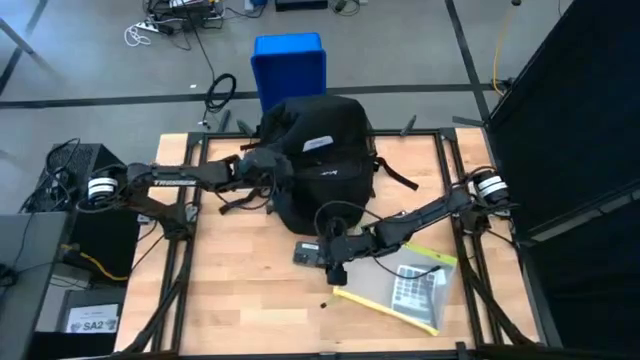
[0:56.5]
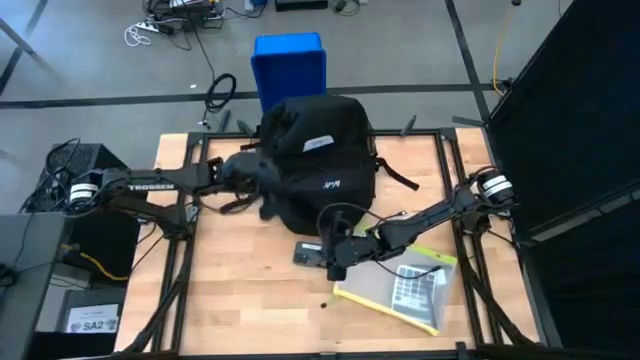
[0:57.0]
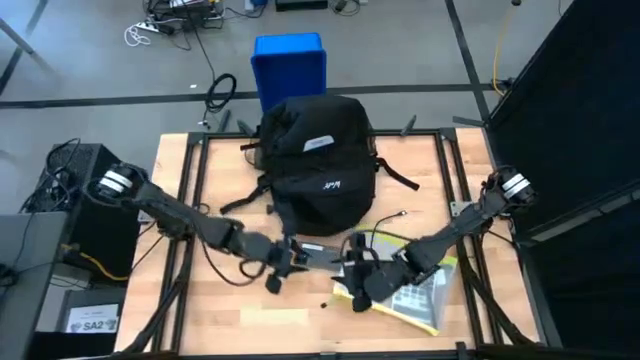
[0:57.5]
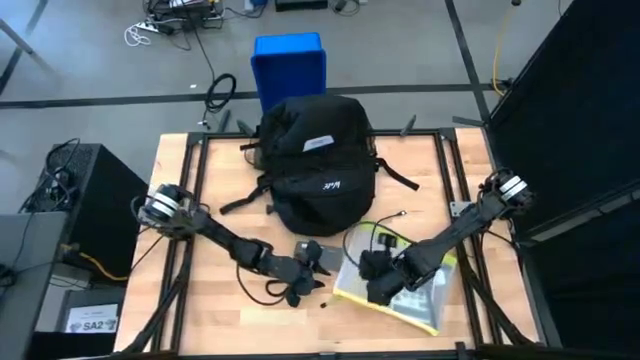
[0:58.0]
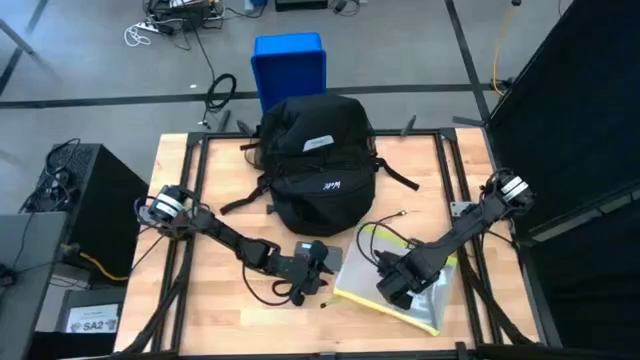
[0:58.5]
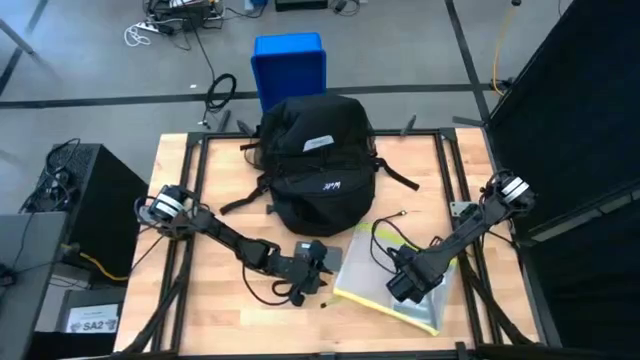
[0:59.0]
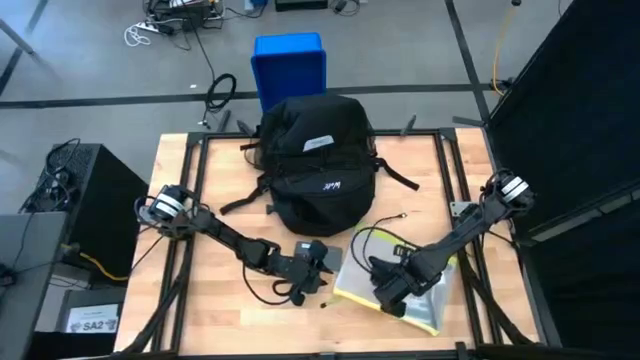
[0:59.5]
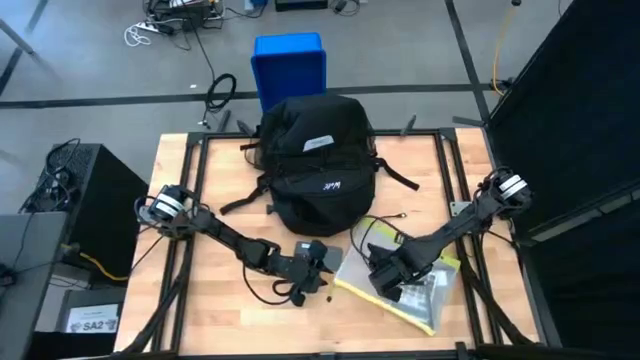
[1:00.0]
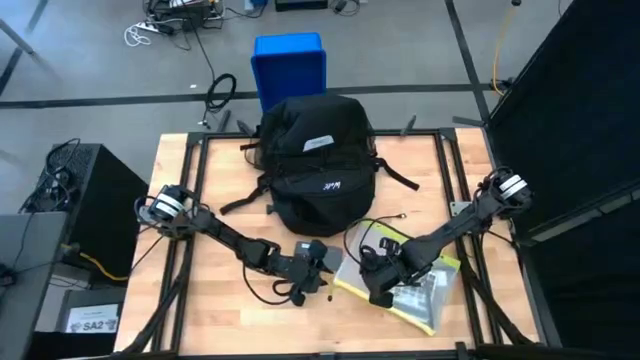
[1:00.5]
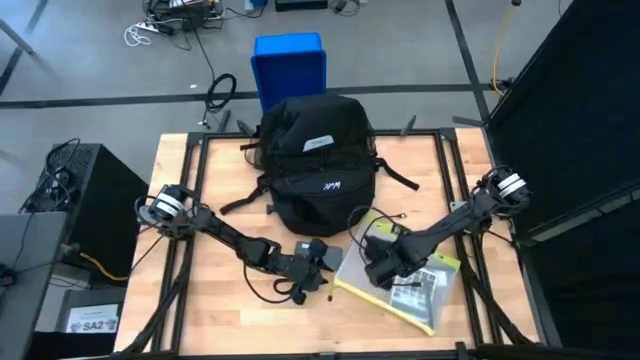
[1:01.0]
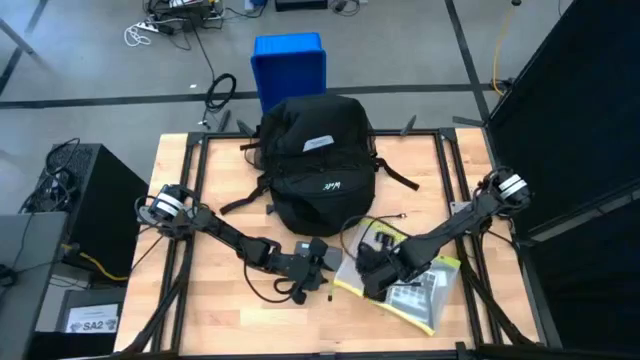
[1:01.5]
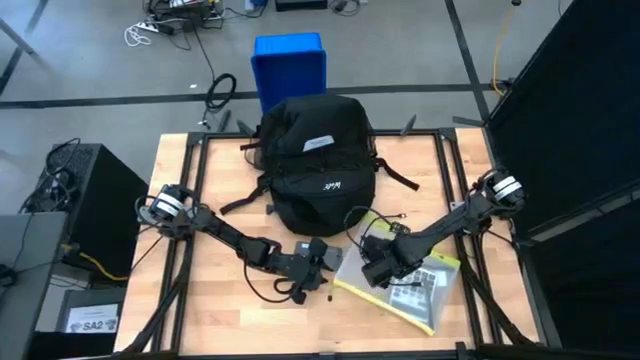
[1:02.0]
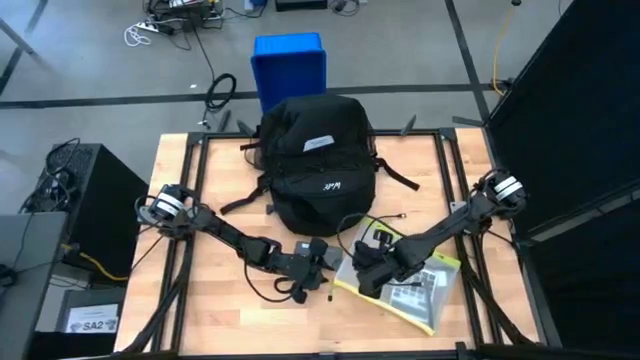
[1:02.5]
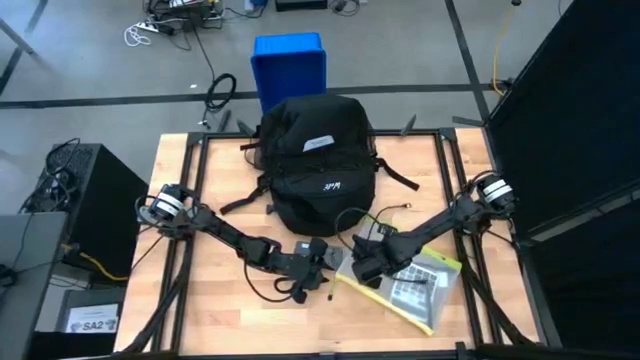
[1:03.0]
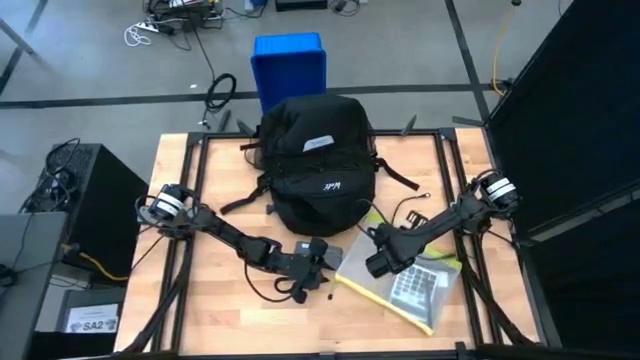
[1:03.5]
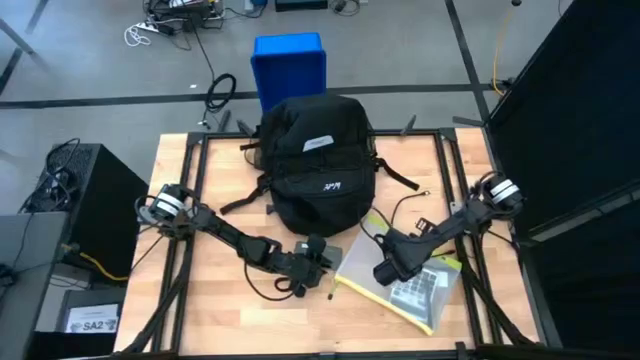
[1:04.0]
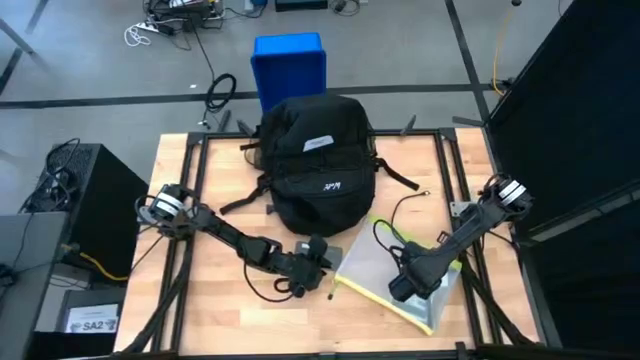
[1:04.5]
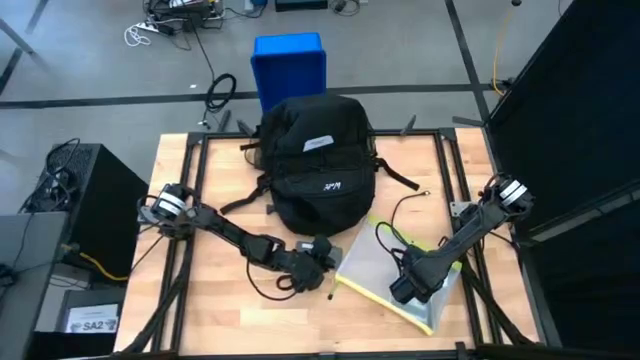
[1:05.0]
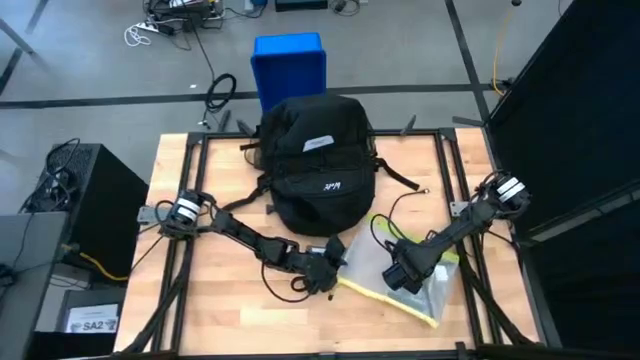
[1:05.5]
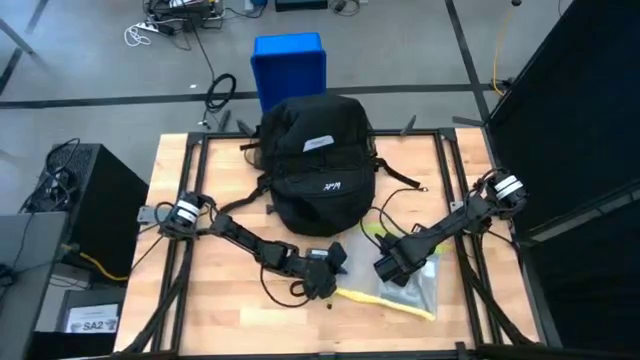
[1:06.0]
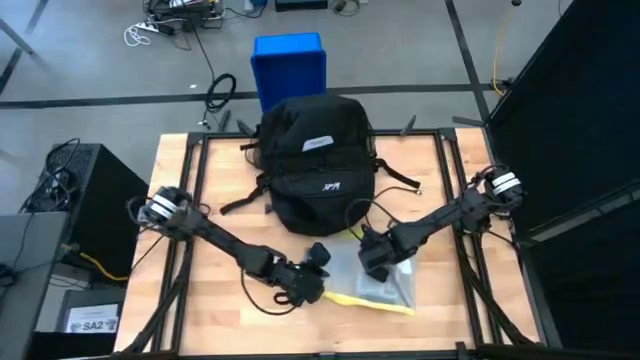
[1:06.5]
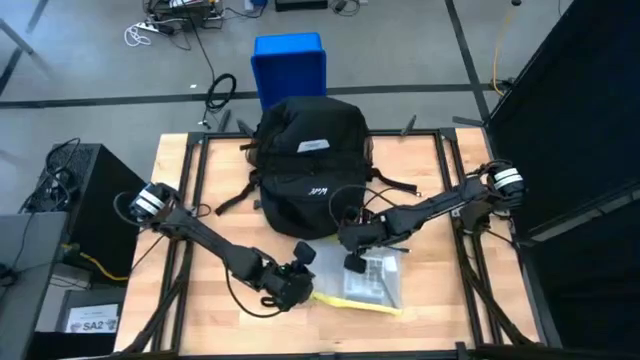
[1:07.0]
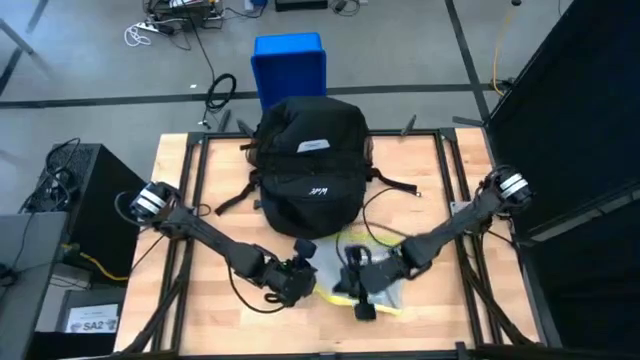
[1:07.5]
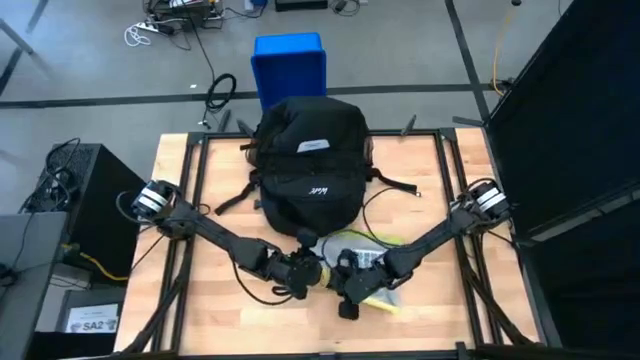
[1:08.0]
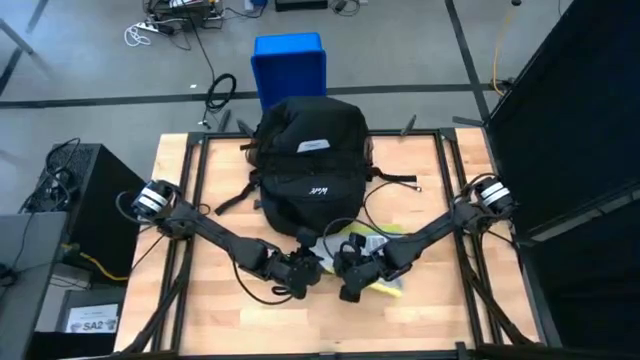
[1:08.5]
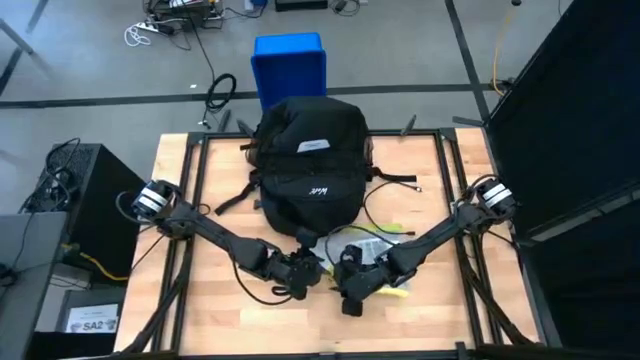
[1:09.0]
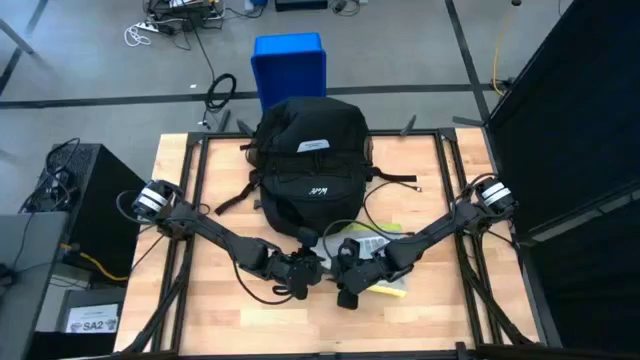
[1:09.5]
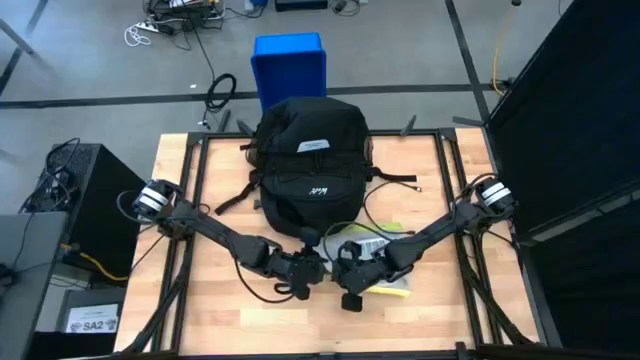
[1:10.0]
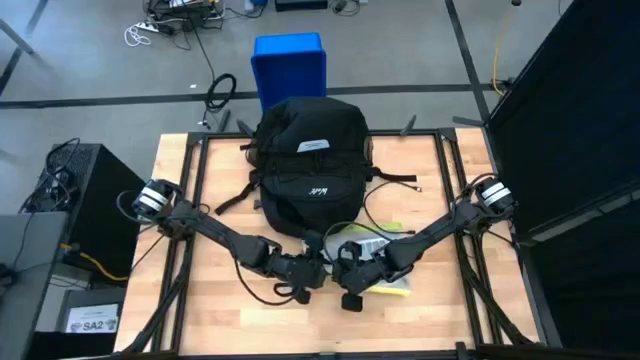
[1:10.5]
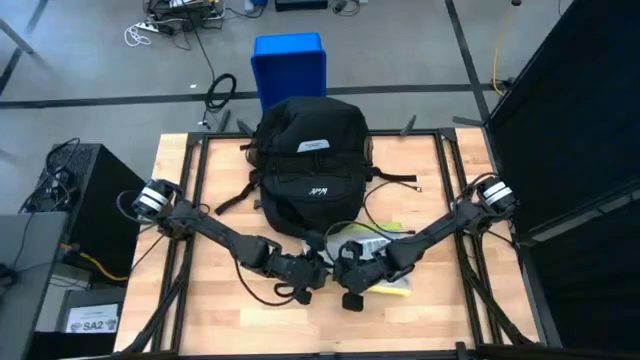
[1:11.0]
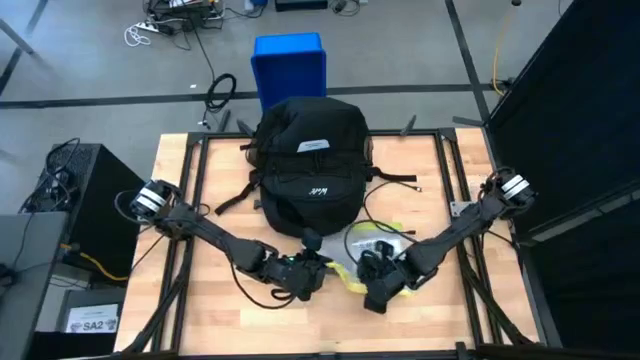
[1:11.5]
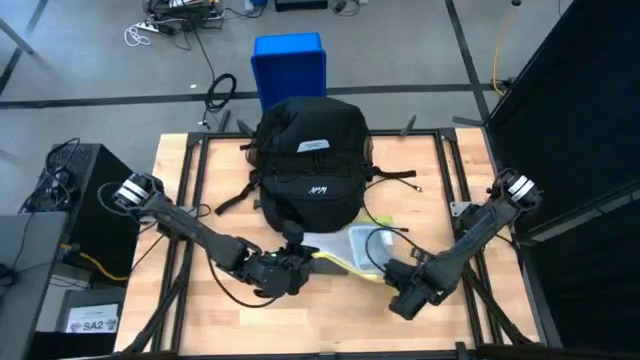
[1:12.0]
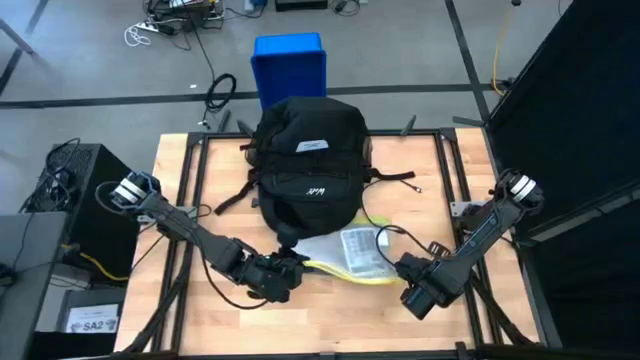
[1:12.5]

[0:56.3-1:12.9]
Task: Unpack backpack
Open the zip bag

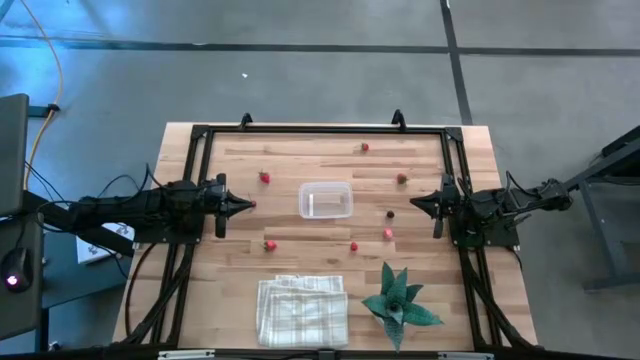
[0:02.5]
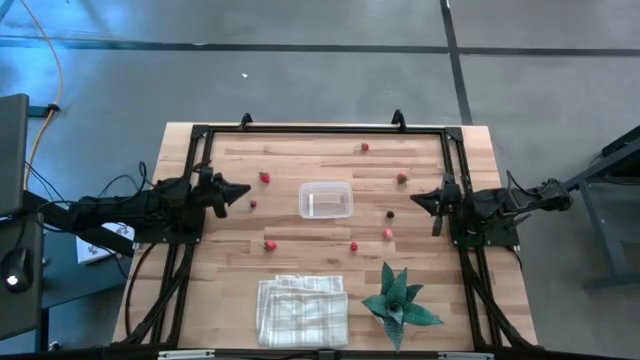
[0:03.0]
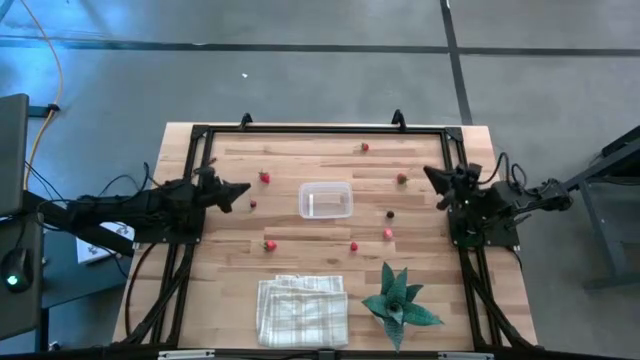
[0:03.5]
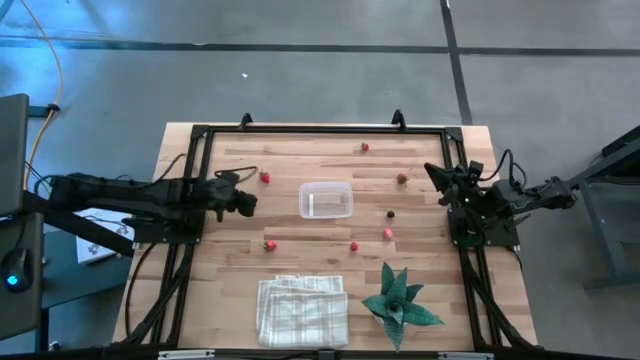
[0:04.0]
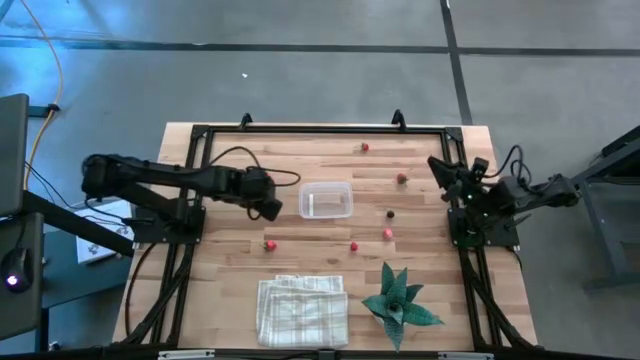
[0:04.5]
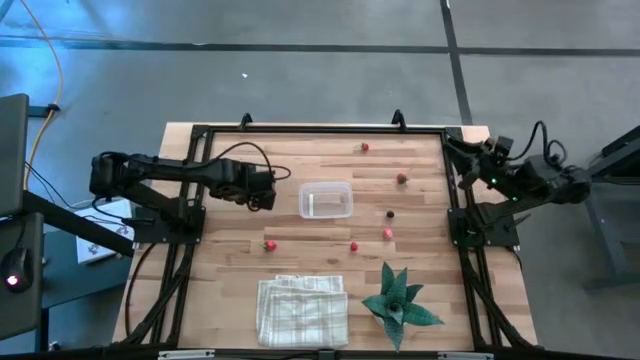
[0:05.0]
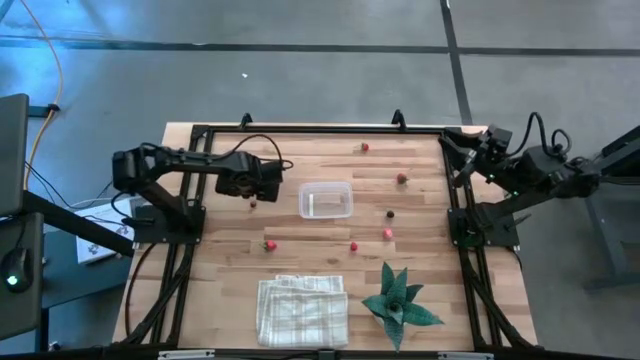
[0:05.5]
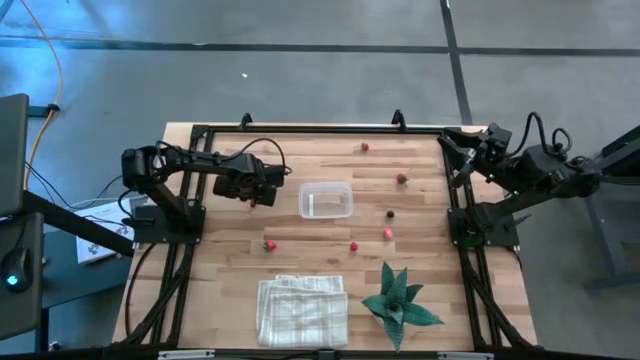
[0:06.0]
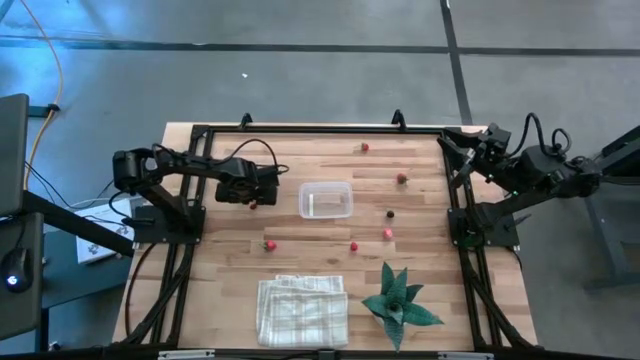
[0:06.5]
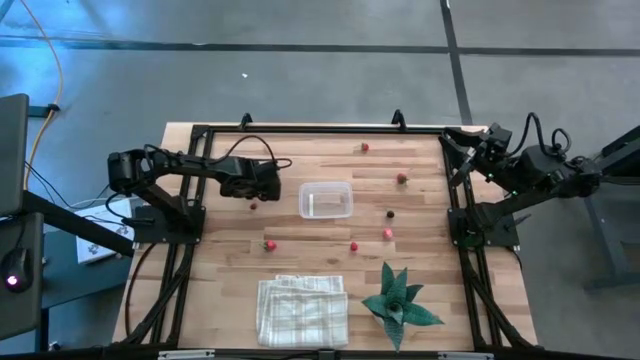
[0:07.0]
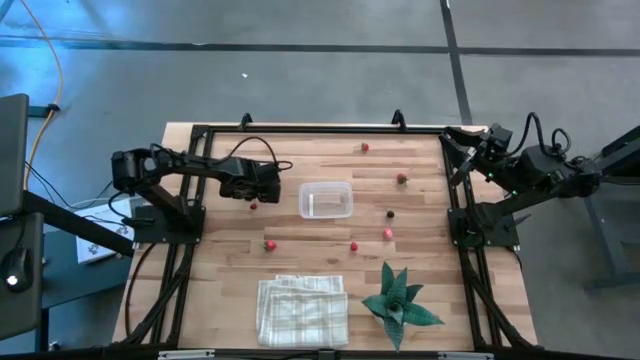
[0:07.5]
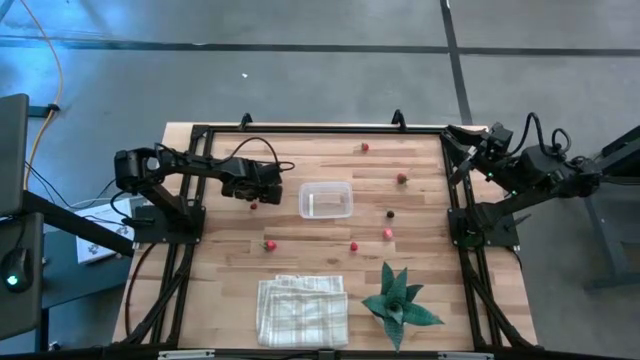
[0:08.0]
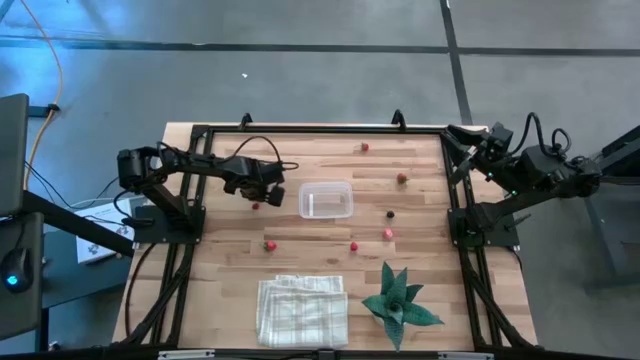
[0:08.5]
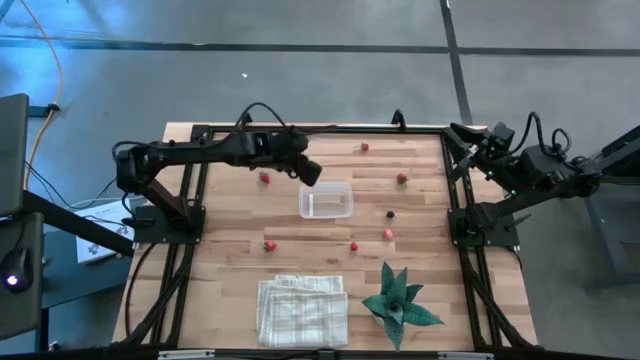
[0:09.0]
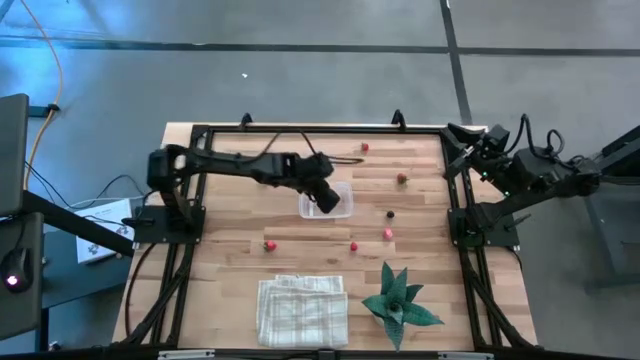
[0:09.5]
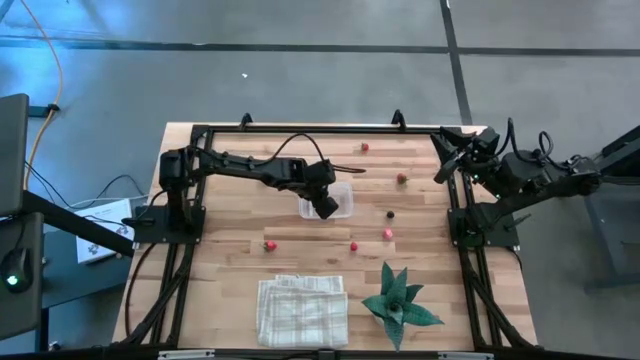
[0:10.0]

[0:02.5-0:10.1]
Task: Pick and placing Produce into tupperware
Put the red cherry into the transparent bin
